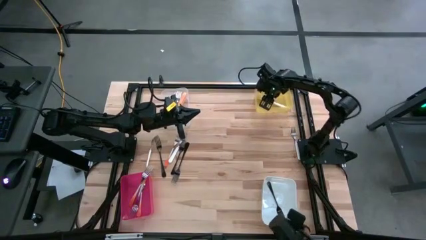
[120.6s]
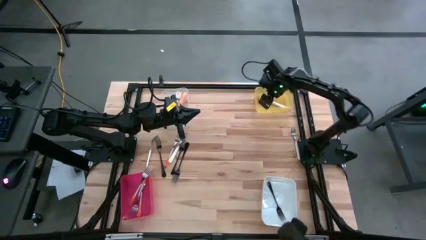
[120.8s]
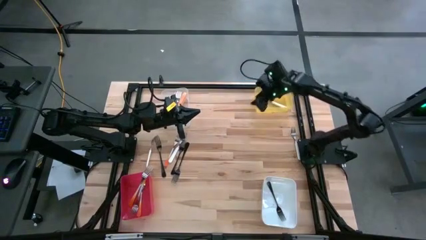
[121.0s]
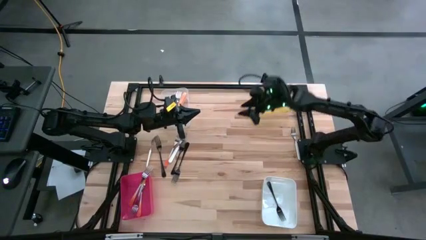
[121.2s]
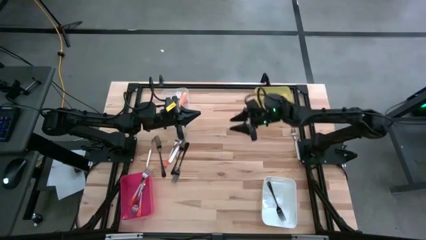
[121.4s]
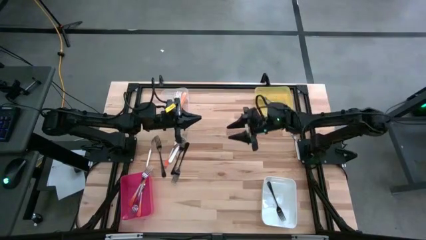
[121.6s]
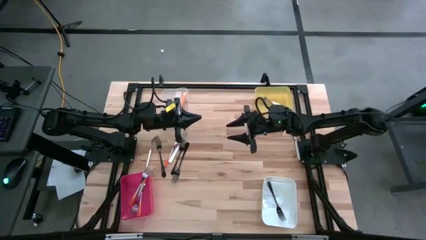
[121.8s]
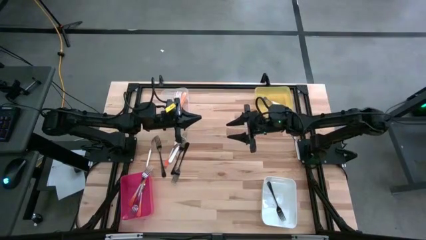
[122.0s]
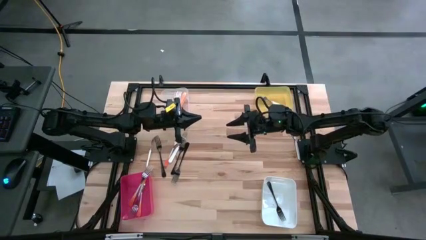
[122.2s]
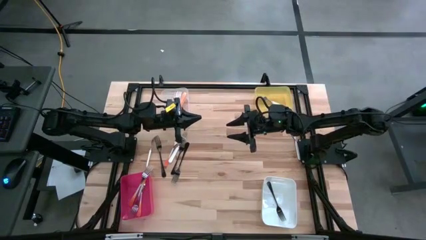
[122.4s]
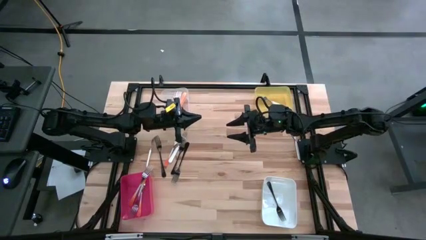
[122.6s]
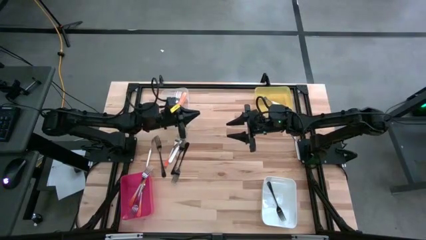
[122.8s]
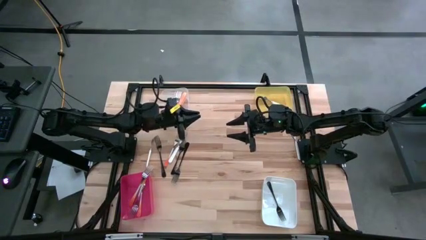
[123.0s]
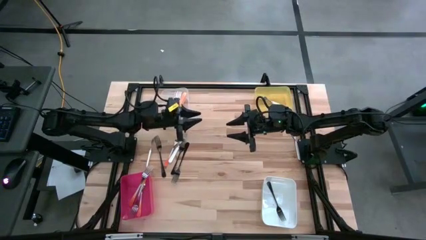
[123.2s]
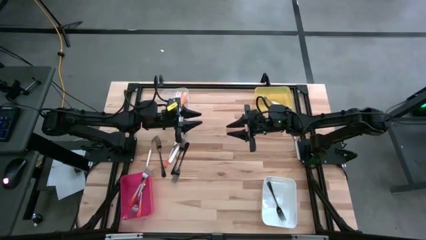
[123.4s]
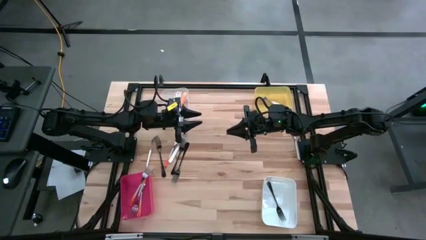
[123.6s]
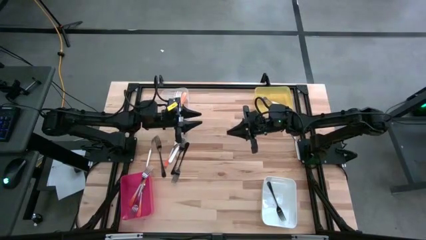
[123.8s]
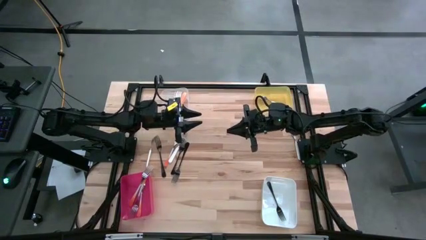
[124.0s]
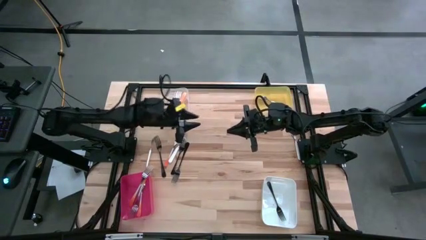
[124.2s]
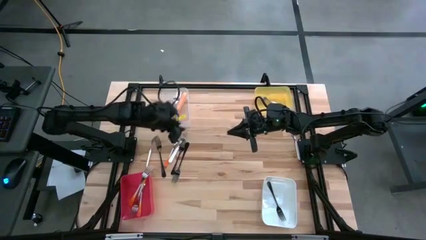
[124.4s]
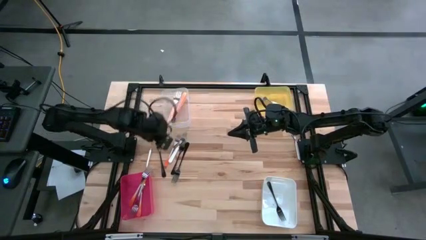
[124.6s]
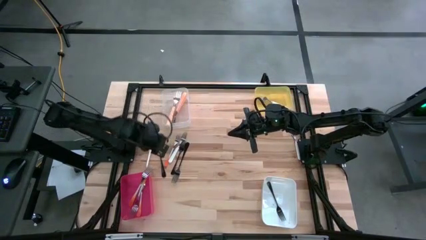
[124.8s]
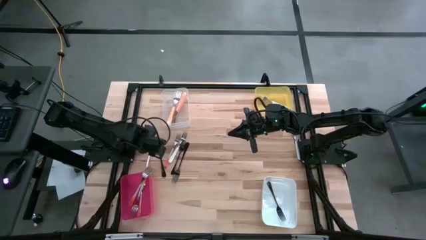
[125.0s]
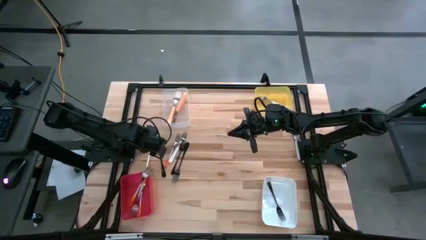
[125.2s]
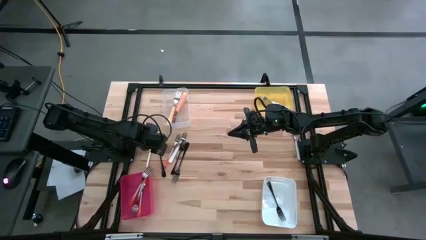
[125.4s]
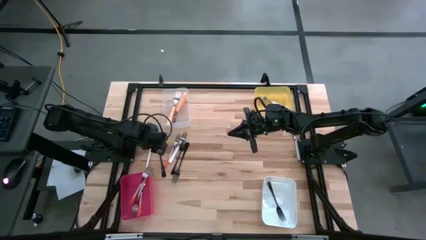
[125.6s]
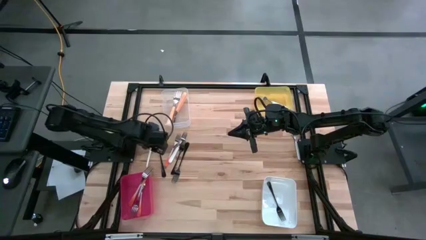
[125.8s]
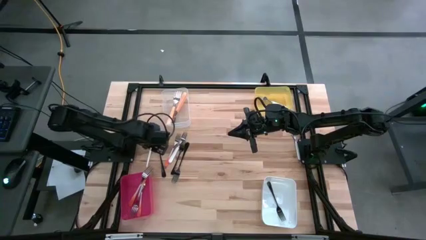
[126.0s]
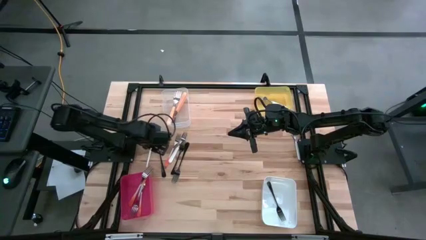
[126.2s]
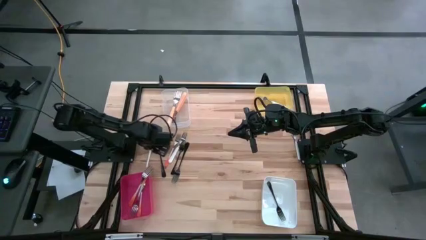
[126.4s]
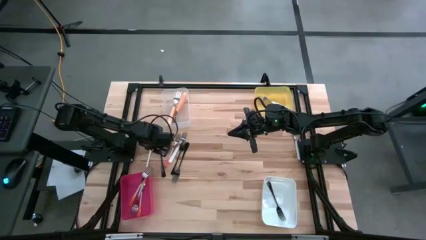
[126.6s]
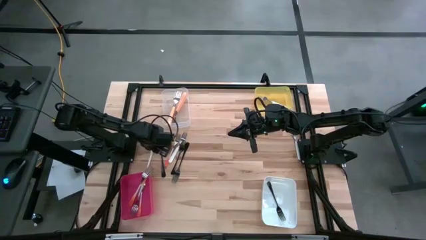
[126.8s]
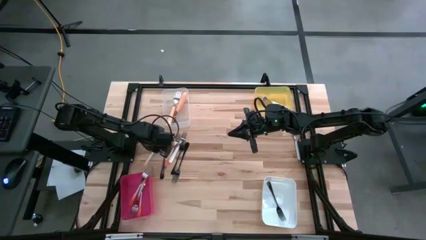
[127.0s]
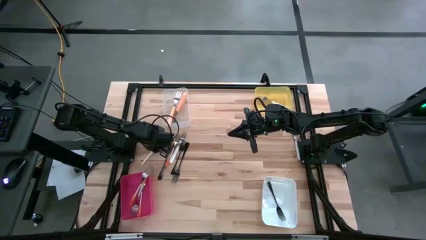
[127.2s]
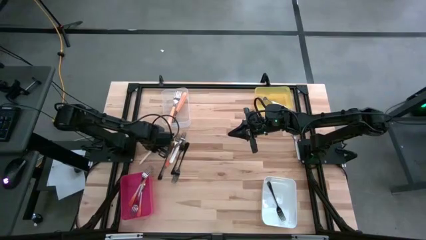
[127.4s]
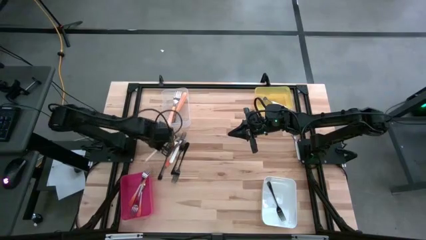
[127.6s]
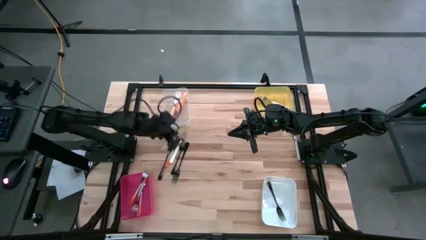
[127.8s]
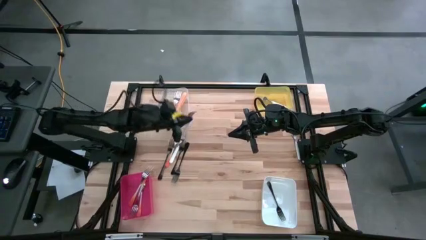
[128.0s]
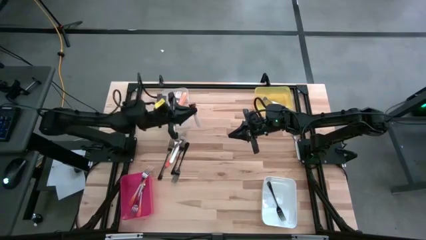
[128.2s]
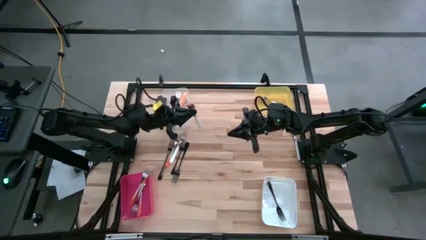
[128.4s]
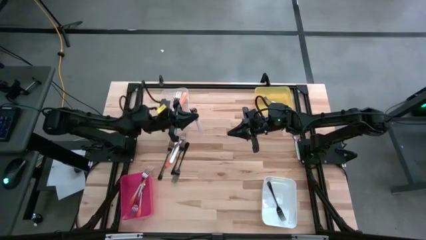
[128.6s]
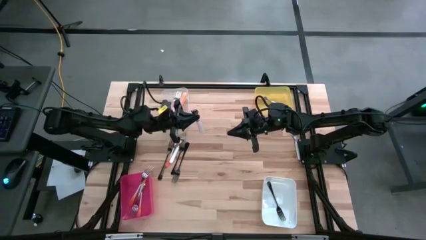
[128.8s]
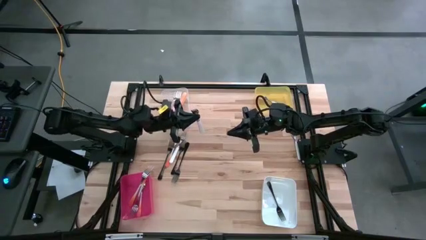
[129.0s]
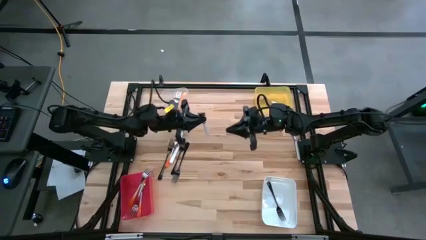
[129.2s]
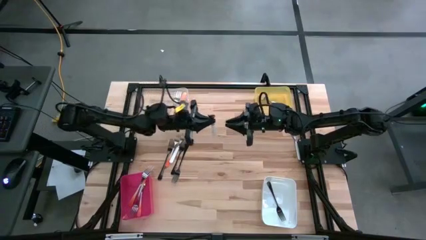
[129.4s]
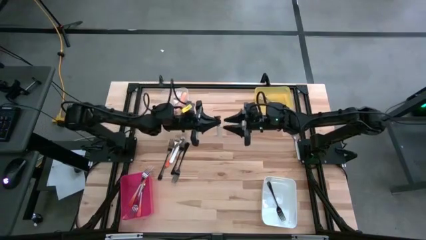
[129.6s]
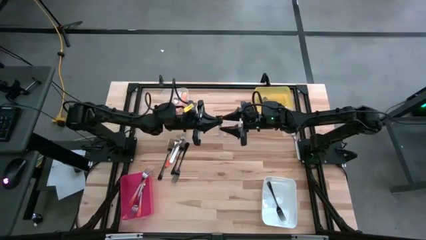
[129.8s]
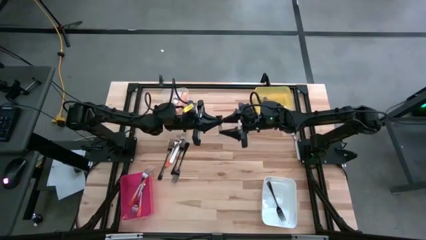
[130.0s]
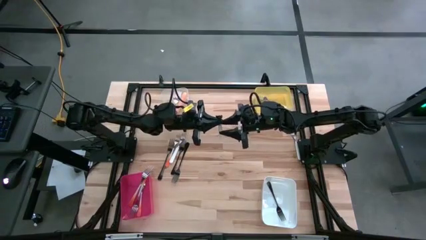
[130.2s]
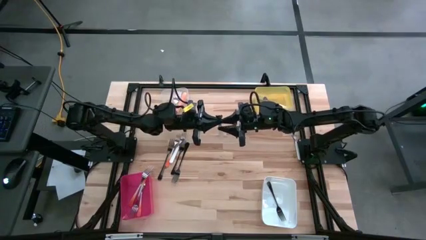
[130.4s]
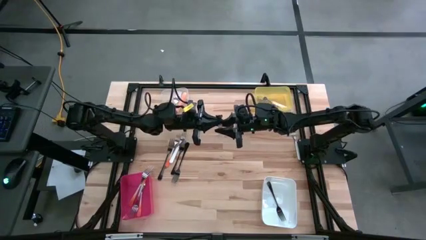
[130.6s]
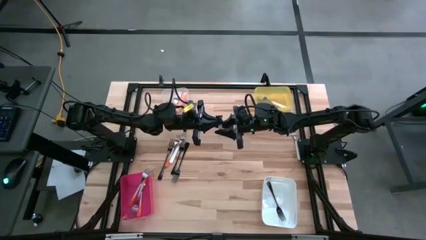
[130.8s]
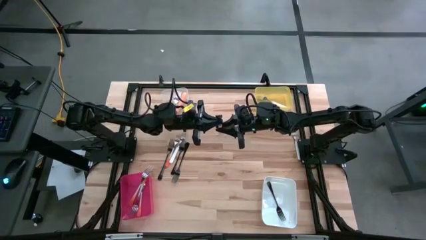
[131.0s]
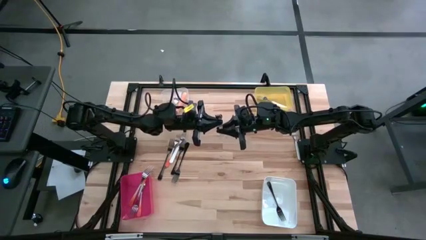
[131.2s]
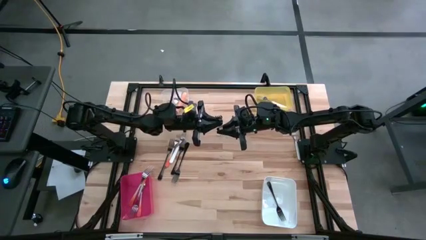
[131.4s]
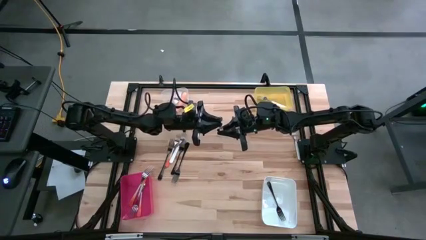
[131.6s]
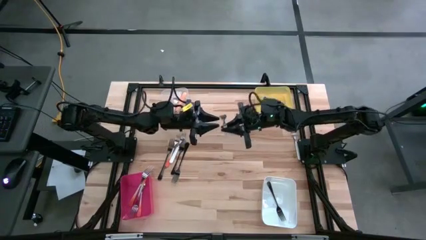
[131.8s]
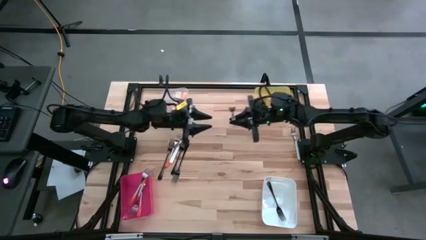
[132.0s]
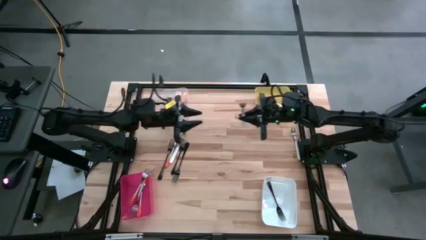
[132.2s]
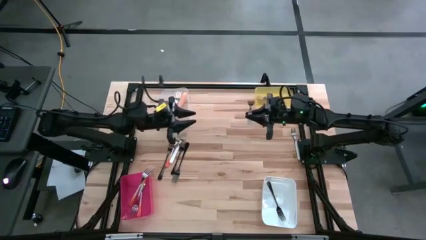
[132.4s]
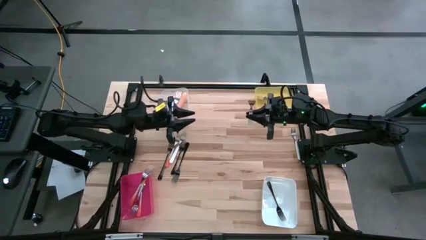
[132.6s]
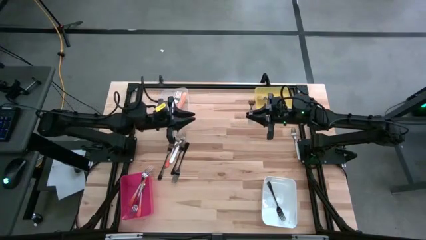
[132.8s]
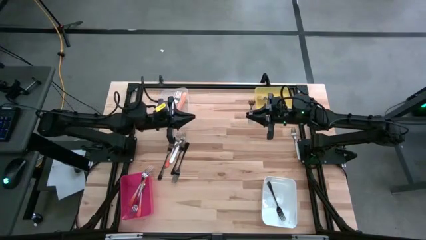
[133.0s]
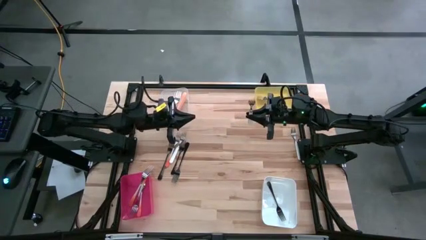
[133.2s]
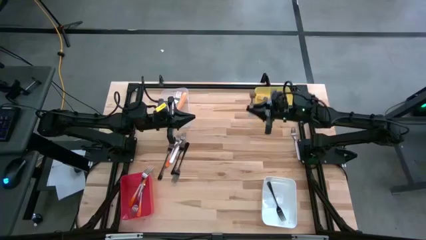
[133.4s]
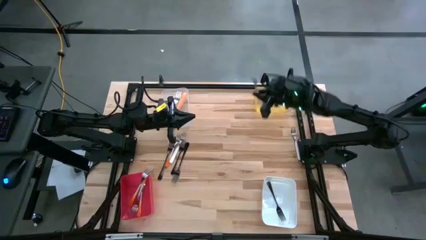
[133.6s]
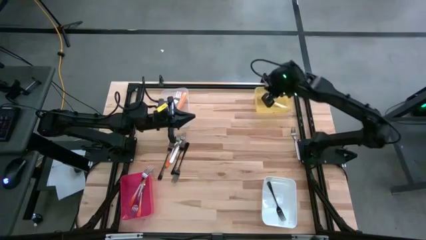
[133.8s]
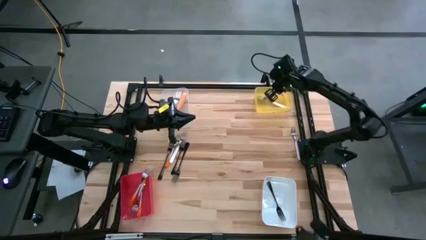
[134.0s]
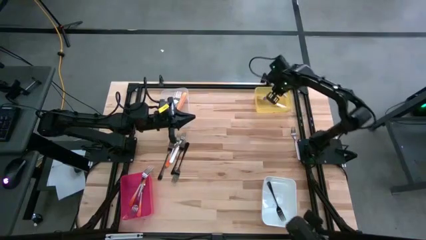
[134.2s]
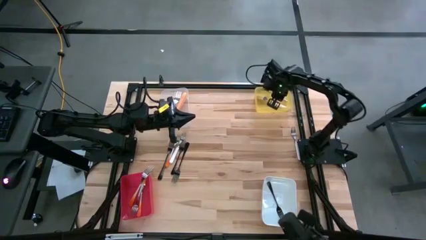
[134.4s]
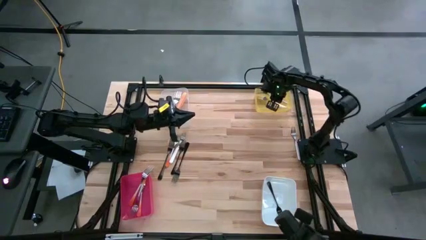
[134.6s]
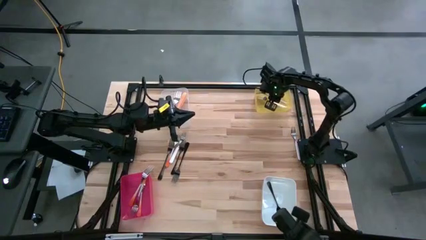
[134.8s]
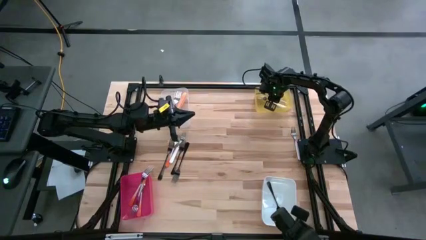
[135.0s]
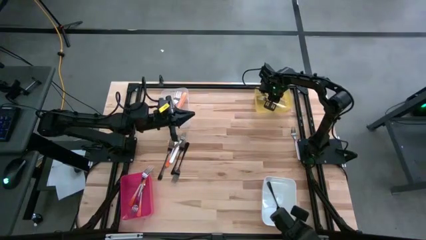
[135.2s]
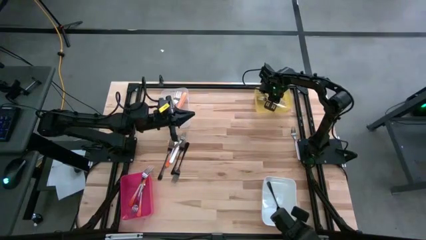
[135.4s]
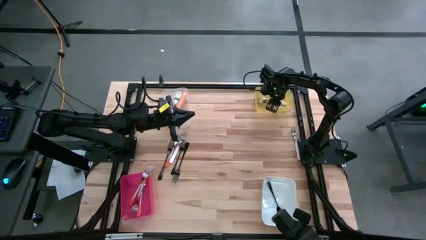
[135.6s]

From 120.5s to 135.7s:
Task: Sort silverware by color (type)
Put the white fork into the yellow bin
